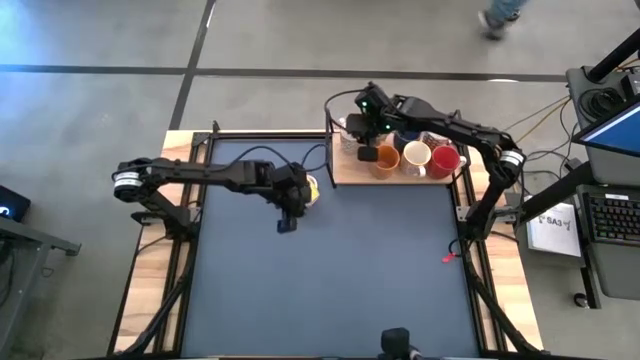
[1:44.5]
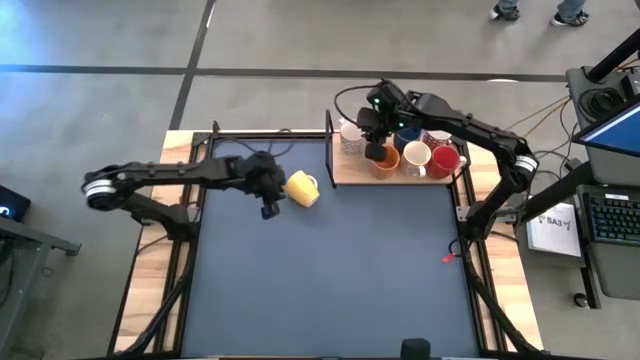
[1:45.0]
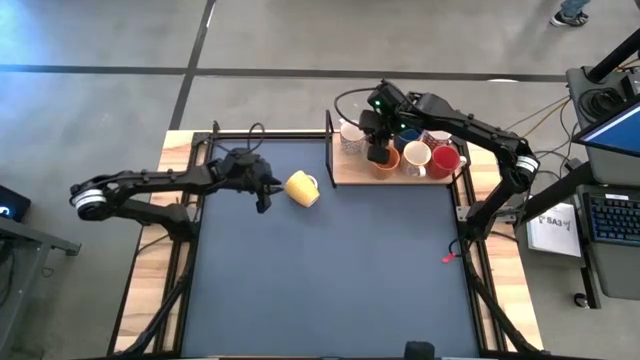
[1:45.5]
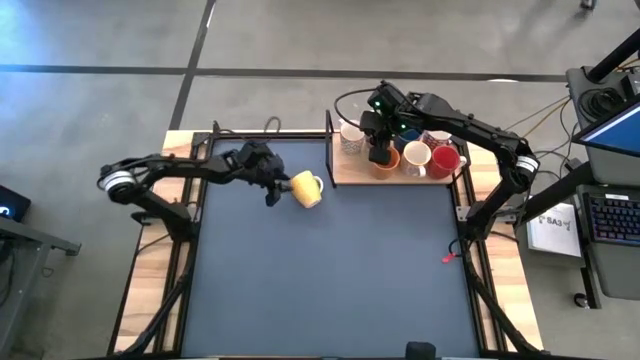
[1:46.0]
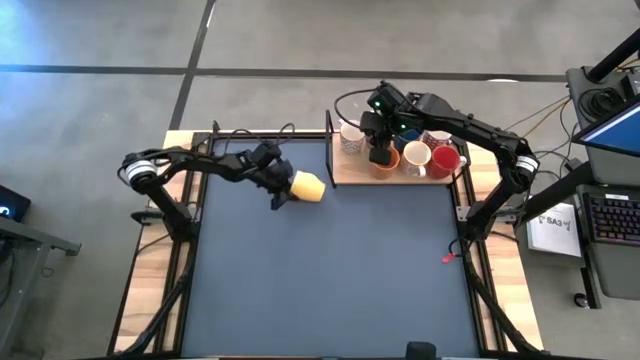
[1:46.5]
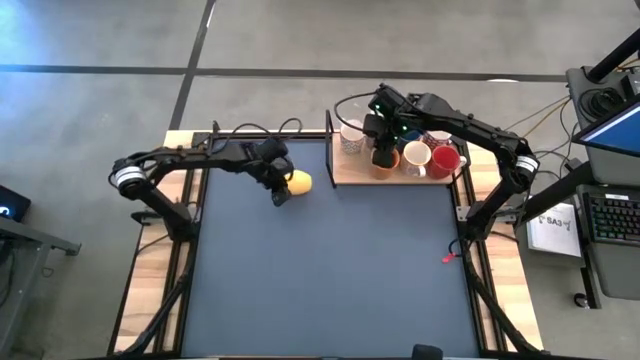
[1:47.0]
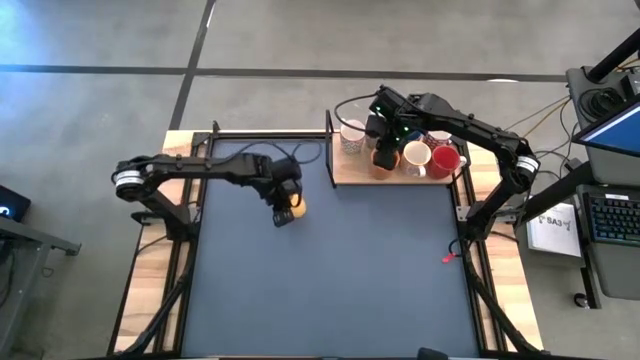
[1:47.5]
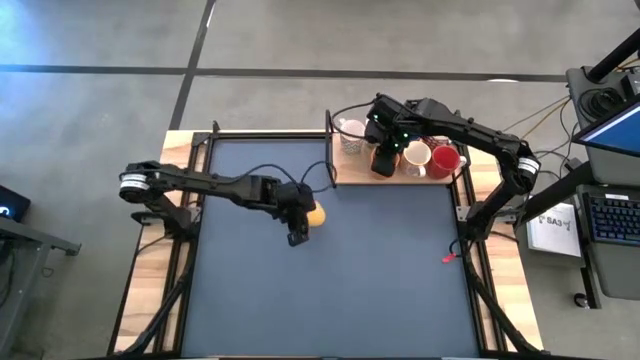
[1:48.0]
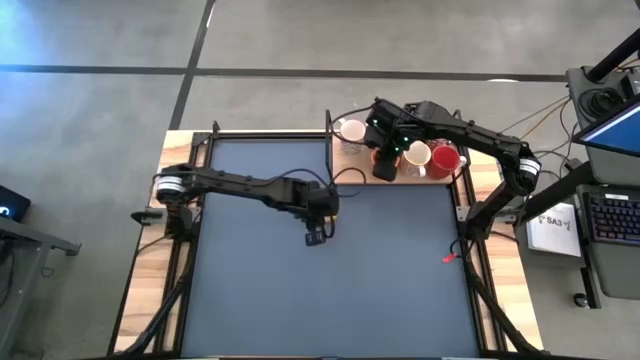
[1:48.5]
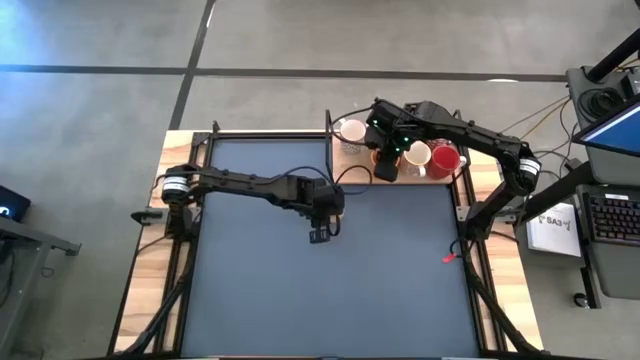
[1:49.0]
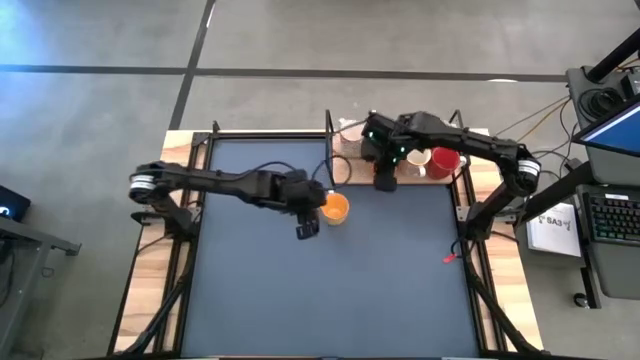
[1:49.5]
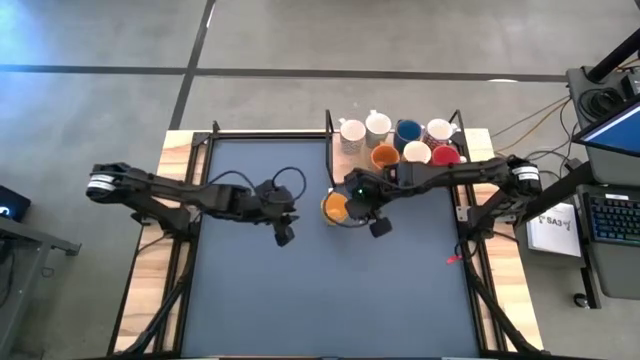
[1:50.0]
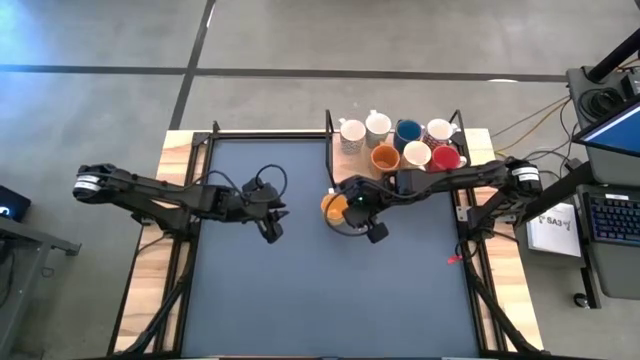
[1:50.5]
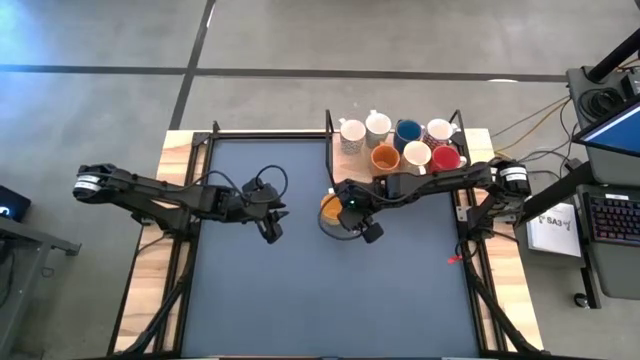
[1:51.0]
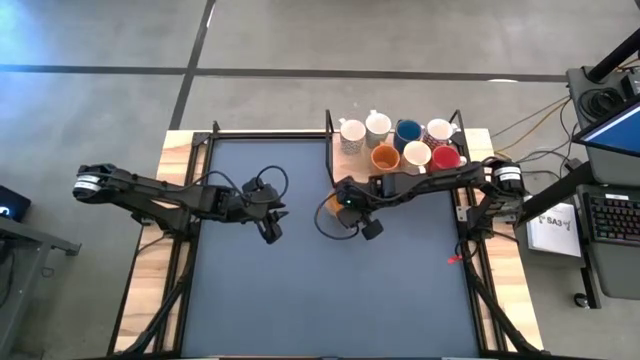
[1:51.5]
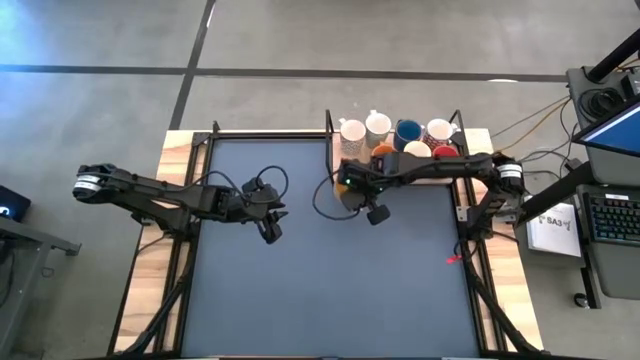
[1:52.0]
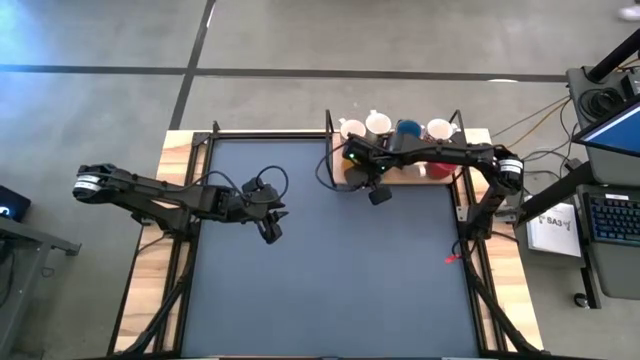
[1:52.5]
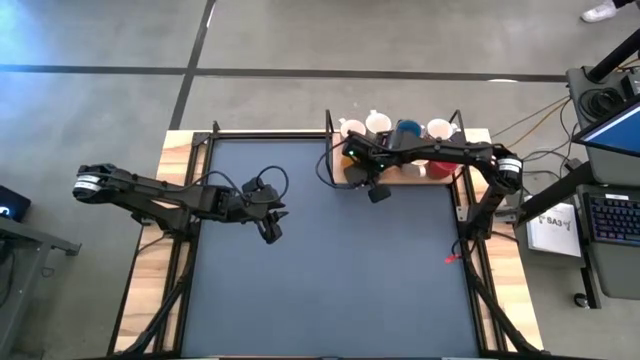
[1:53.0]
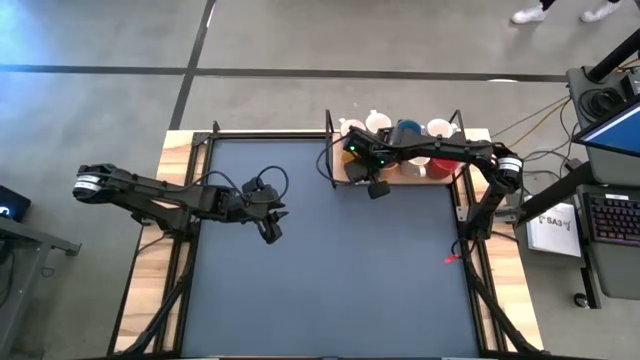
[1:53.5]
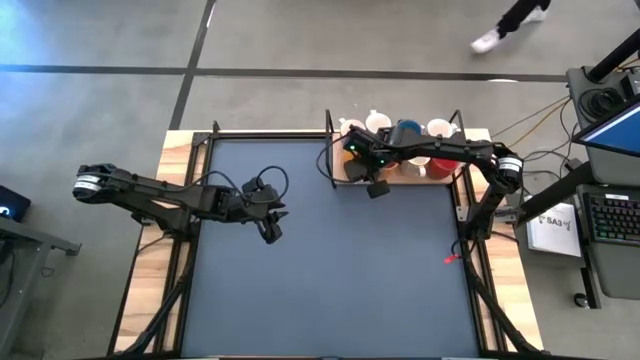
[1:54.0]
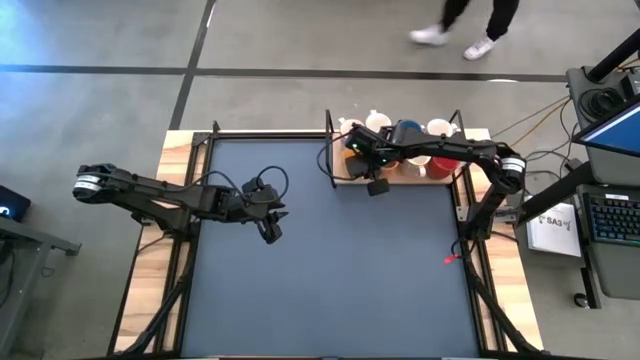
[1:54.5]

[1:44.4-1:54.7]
Task: Place coffee mugs
Put the yellow mug on the shelf

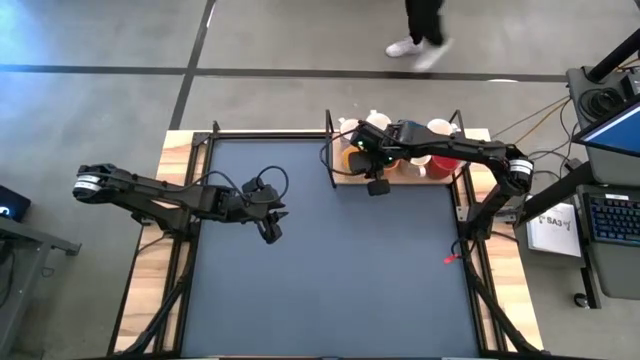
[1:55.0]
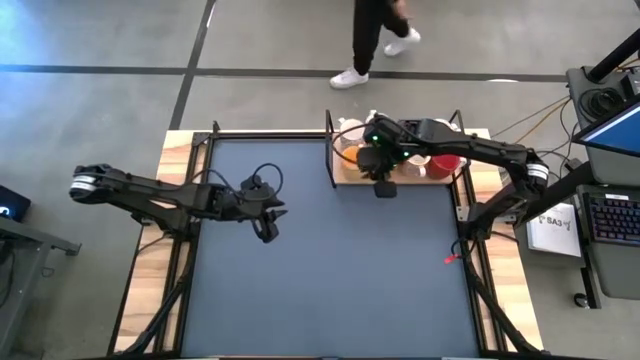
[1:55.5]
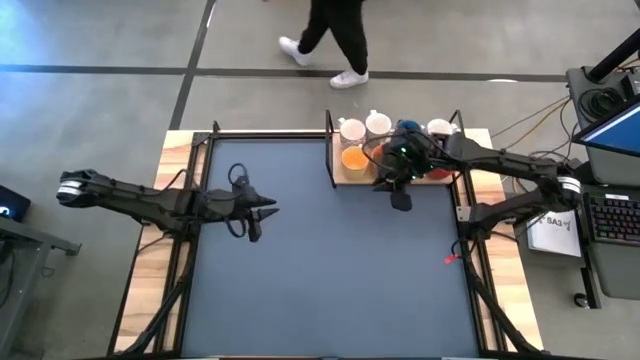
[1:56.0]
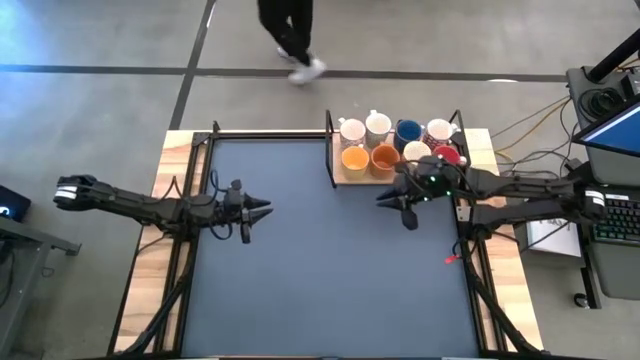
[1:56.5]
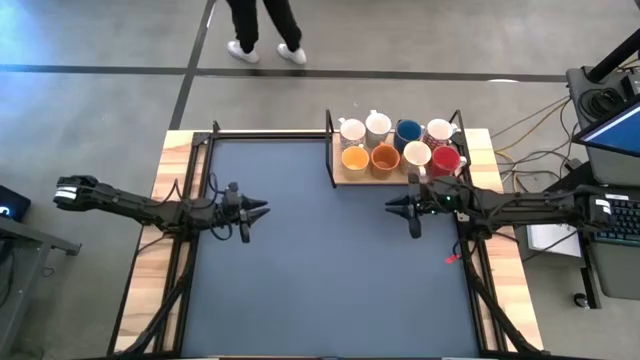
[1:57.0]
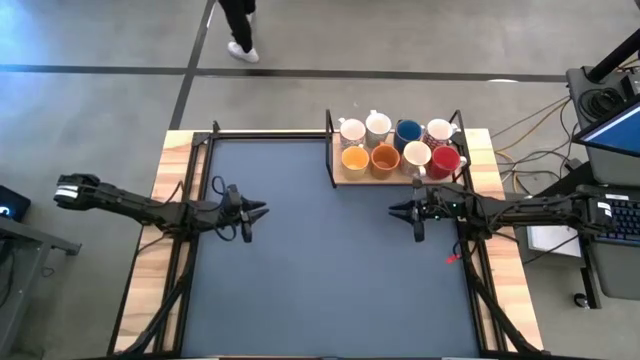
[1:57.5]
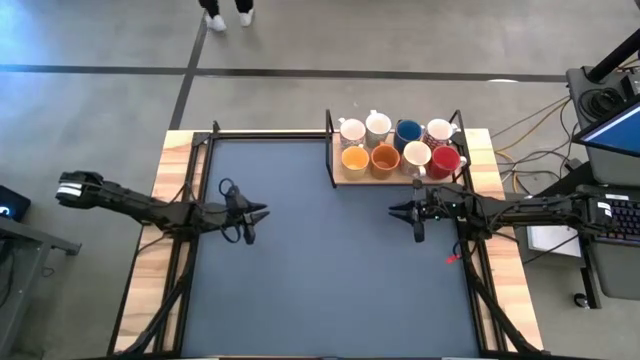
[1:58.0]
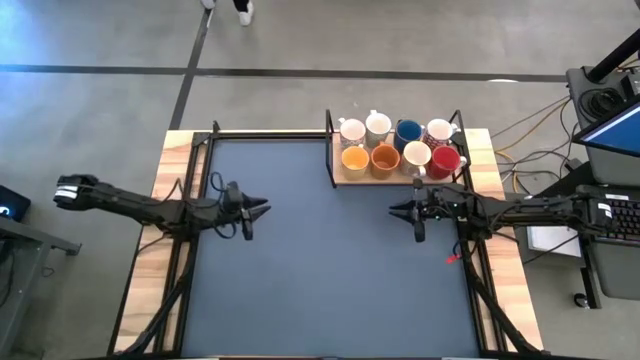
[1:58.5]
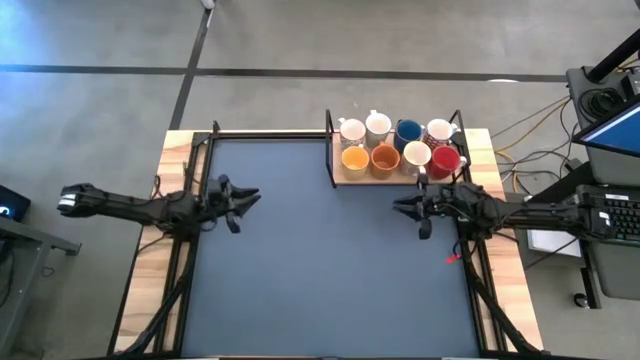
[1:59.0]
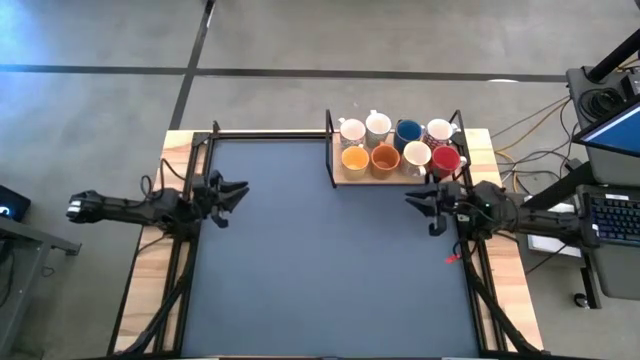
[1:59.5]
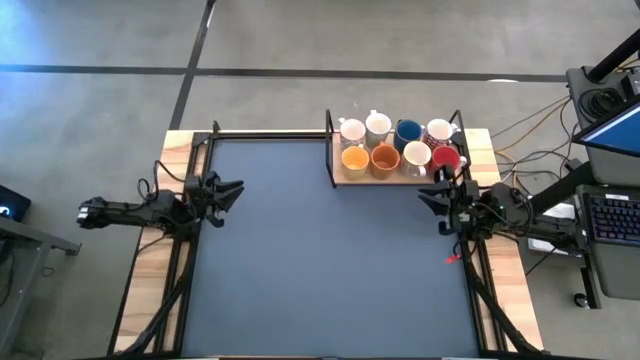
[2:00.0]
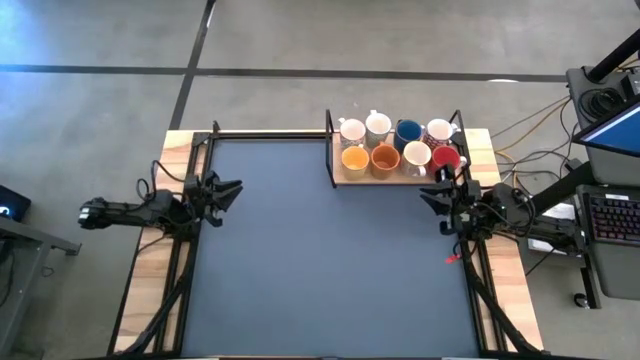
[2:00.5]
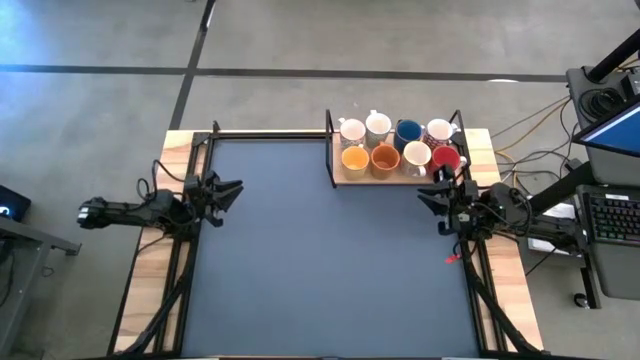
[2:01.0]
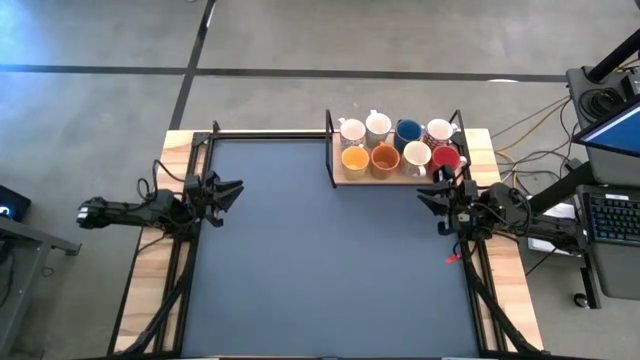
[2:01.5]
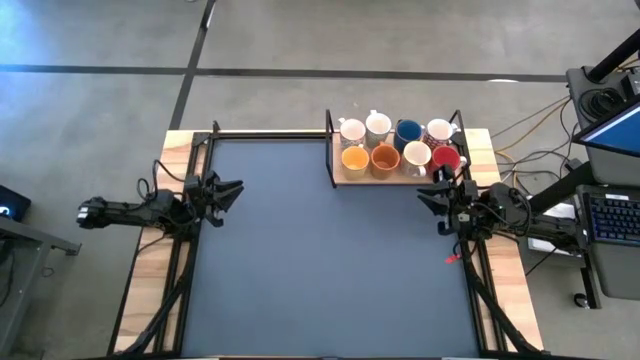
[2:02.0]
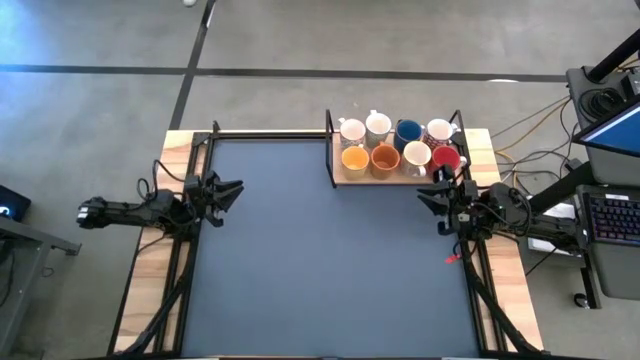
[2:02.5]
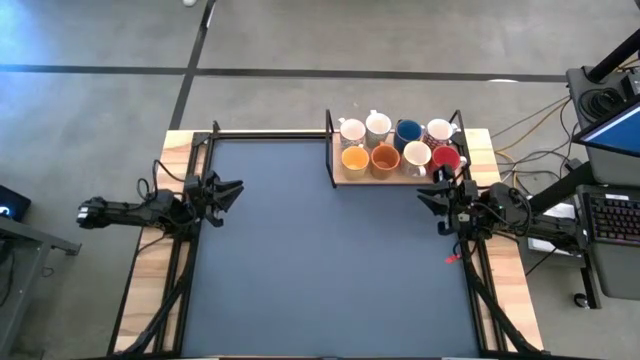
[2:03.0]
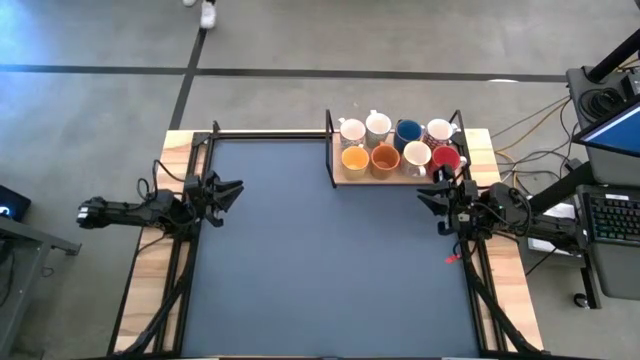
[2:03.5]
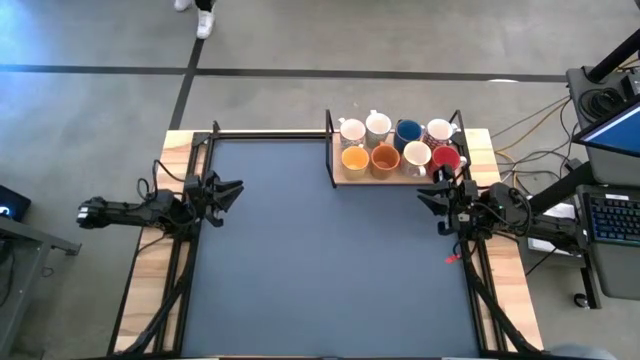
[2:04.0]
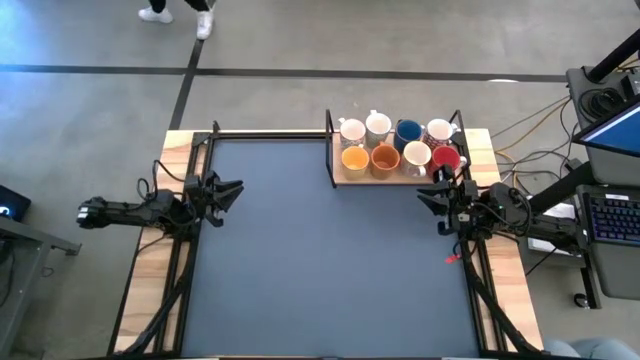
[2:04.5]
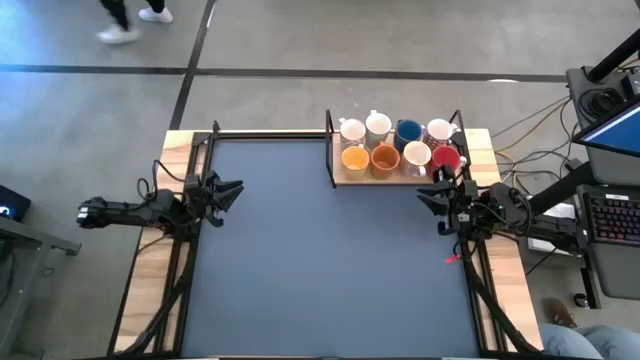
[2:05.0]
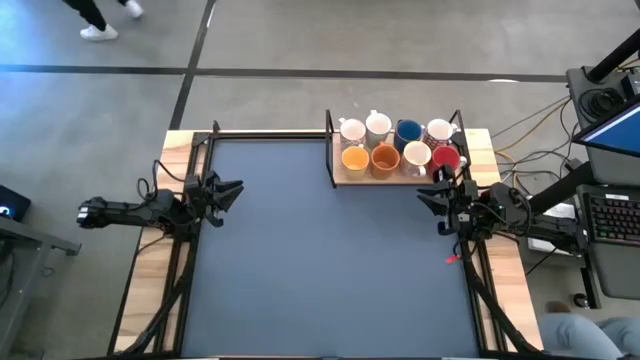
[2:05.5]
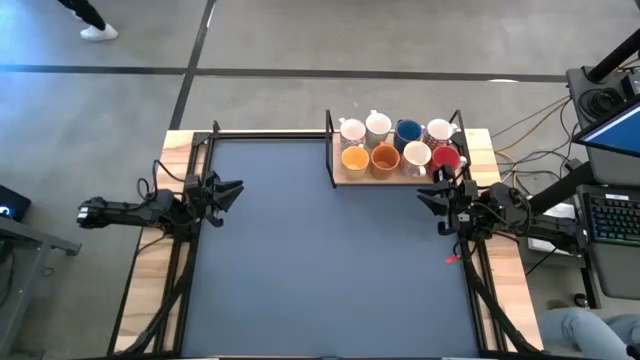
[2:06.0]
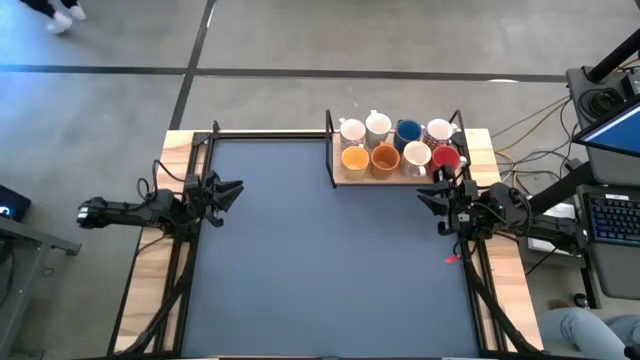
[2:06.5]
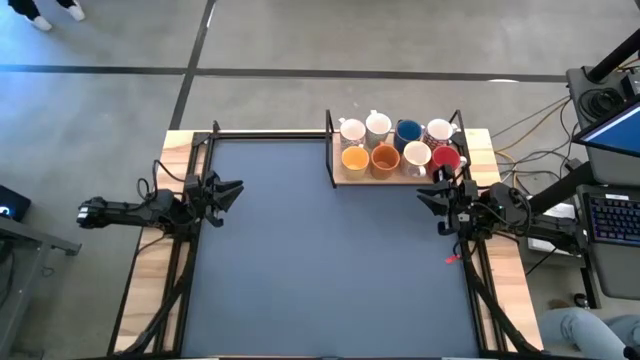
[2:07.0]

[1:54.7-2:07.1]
Return to Home Position
